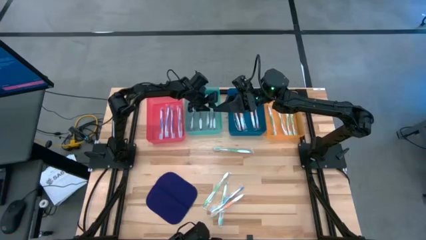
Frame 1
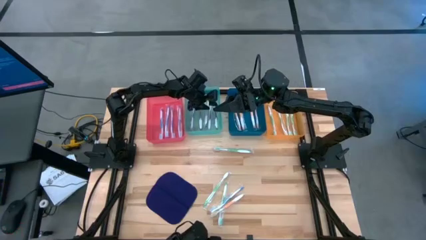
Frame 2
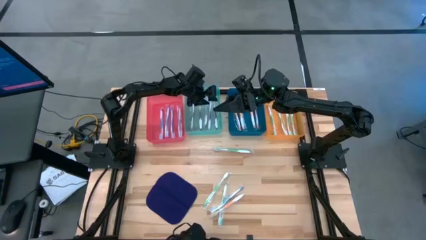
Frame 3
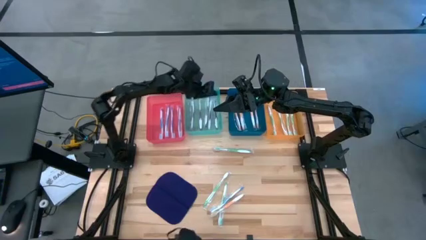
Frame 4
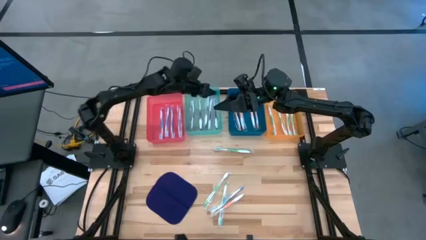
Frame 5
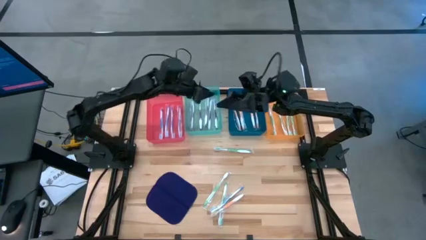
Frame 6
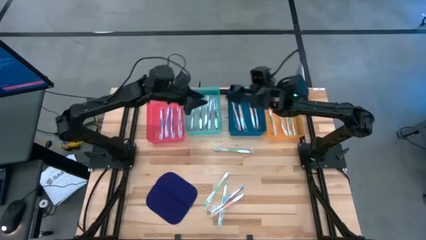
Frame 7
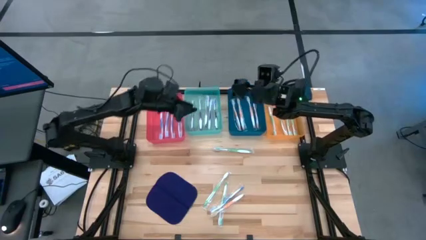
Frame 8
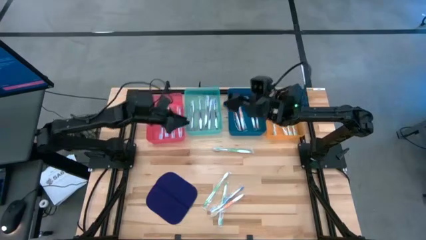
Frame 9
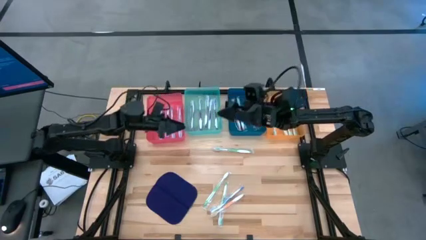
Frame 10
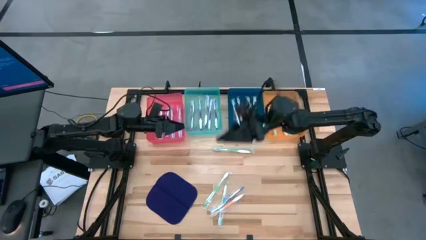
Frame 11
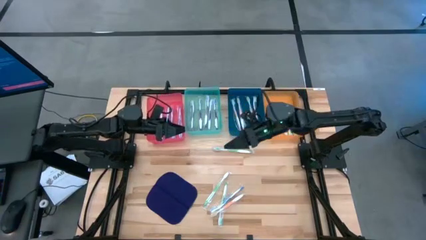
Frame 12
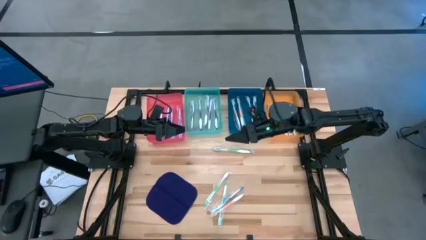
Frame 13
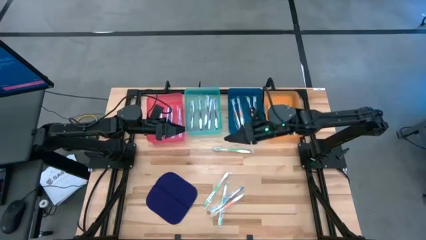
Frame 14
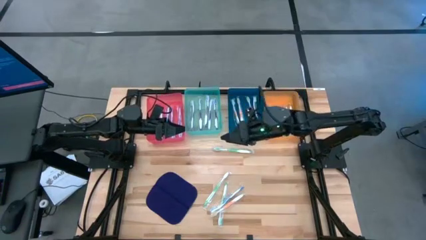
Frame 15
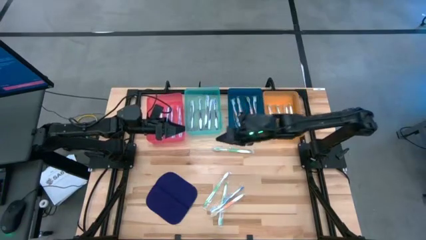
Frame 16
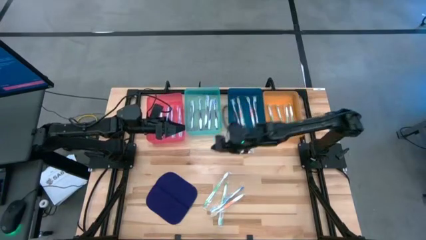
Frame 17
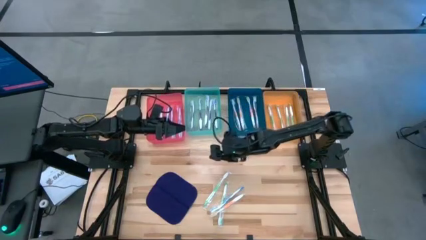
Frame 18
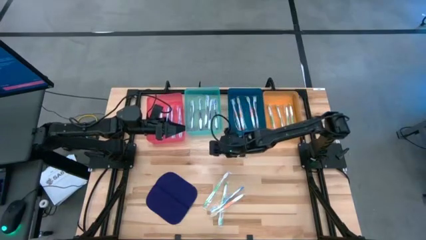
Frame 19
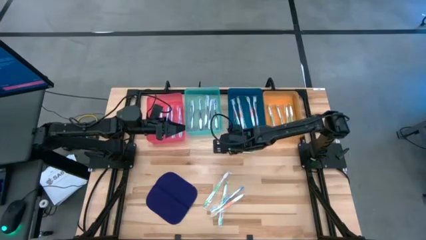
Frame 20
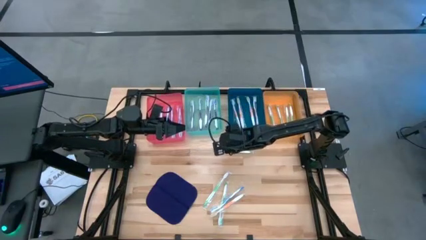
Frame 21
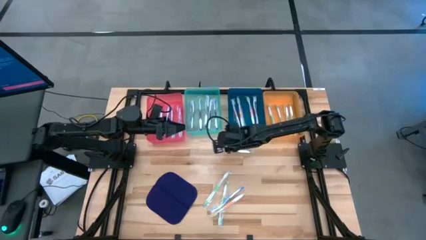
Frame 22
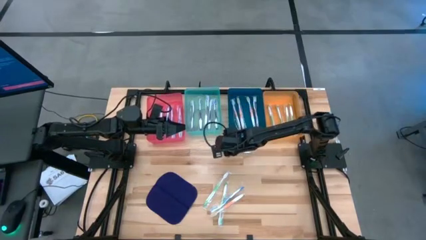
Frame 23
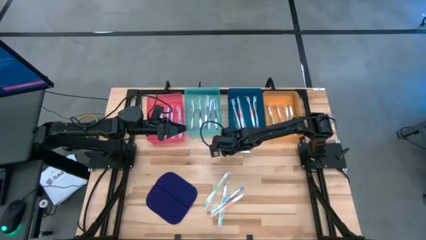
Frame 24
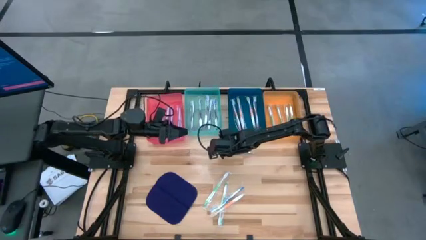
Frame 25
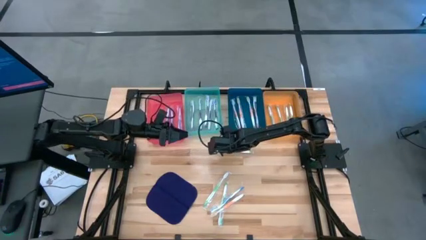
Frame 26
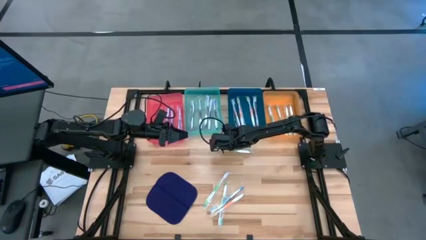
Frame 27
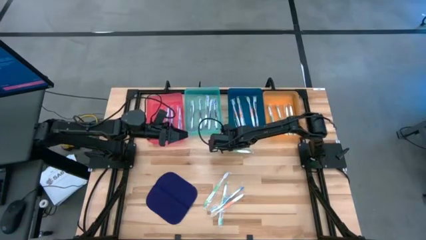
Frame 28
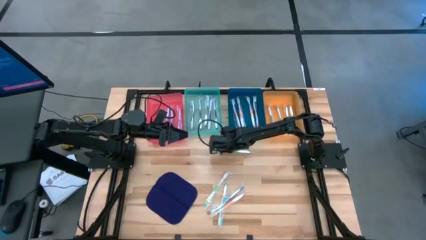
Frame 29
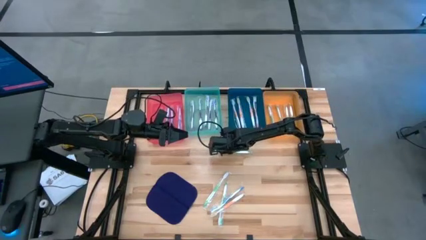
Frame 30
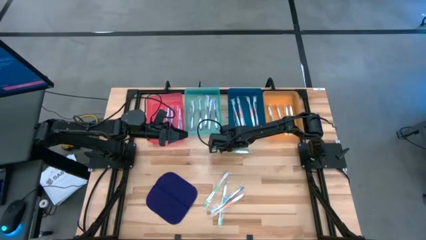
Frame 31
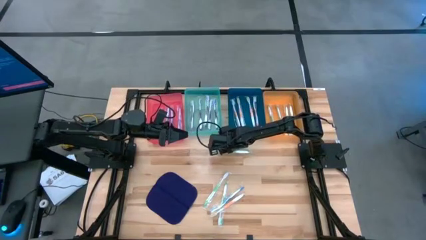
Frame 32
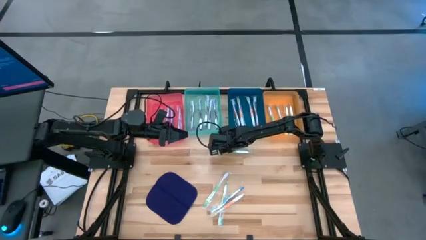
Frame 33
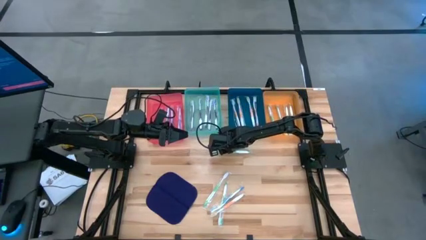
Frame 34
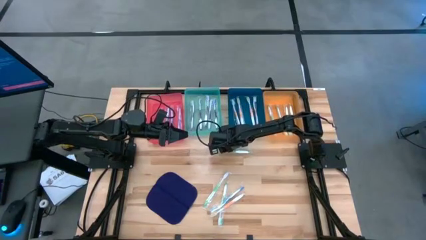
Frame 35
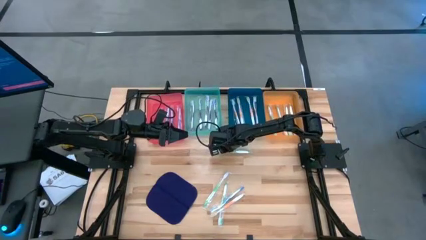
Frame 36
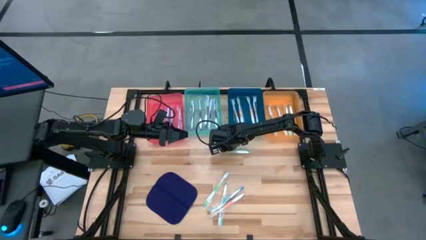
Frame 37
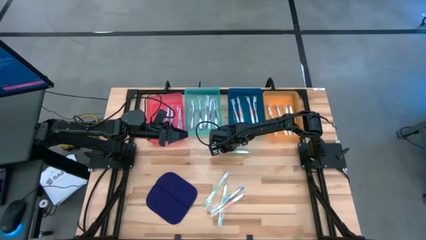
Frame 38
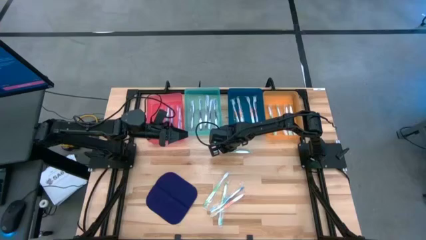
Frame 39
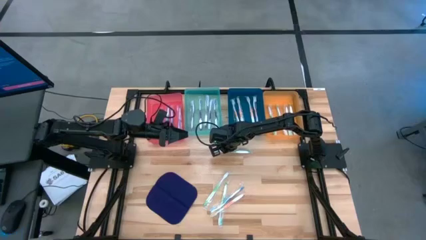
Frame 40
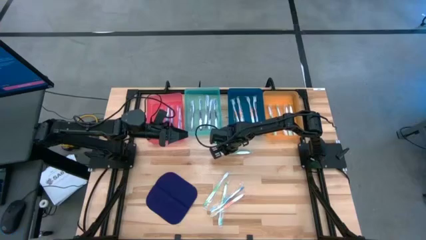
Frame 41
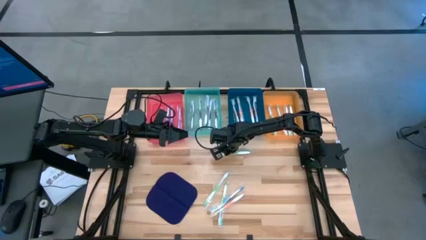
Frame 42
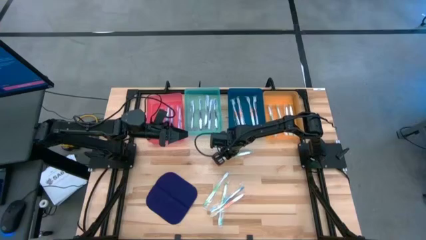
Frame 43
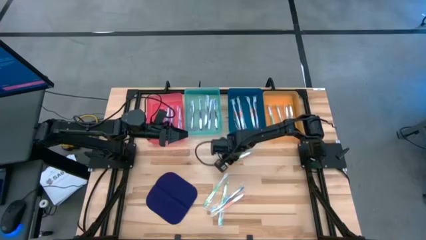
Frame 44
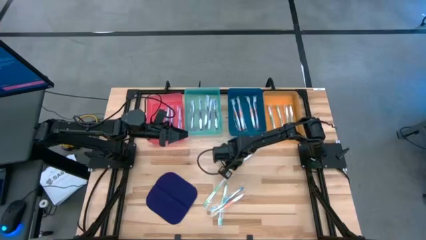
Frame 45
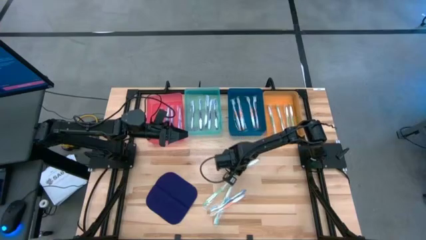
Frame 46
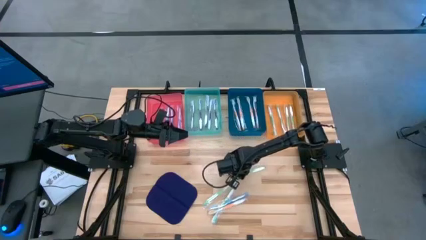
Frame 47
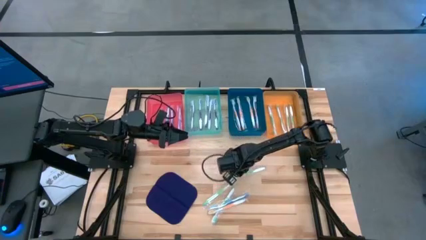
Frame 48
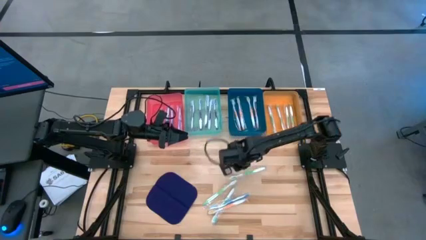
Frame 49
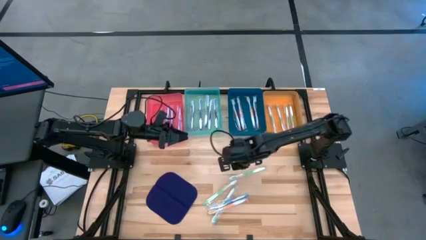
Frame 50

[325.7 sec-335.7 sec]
Task: Pick & Place Toothbrushes
Put the green toothbrush into the orange bin

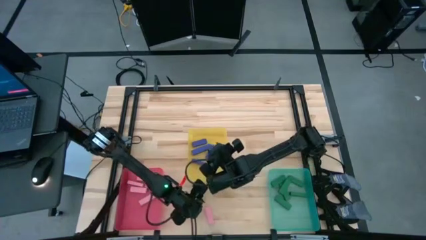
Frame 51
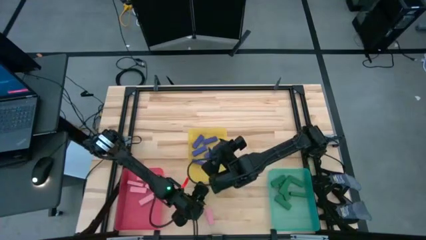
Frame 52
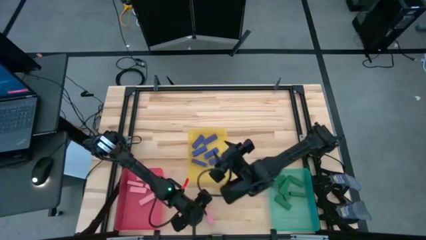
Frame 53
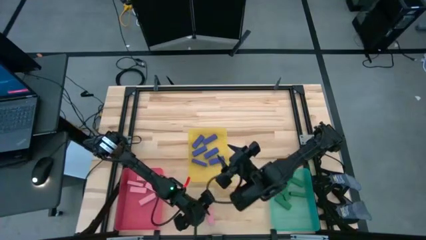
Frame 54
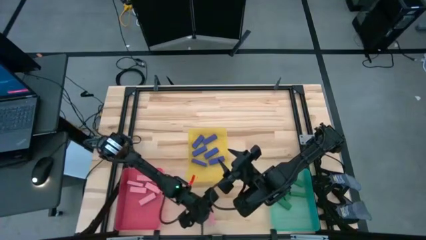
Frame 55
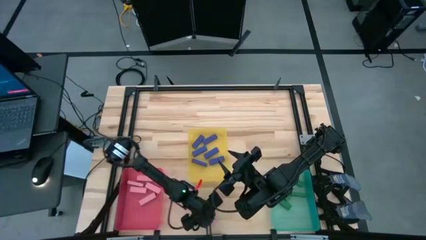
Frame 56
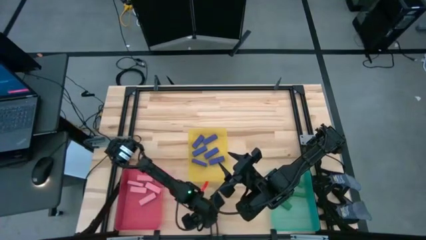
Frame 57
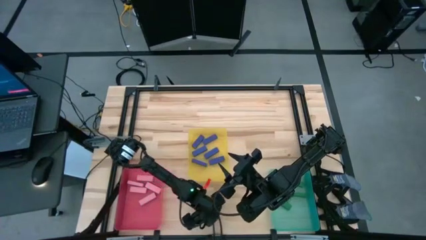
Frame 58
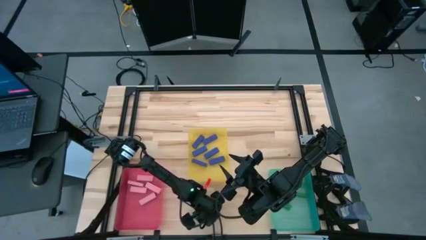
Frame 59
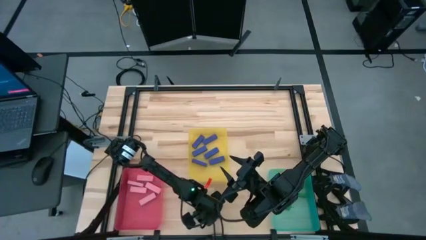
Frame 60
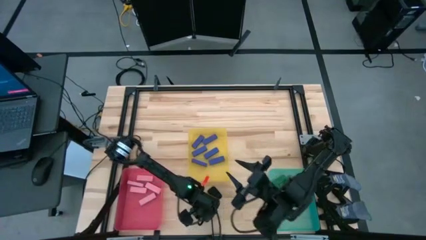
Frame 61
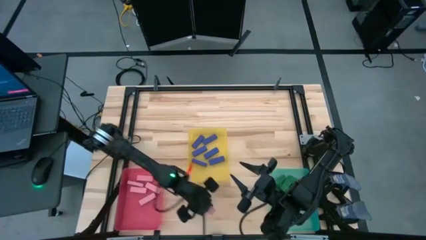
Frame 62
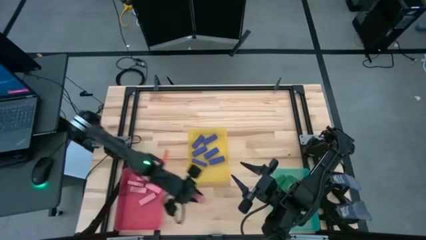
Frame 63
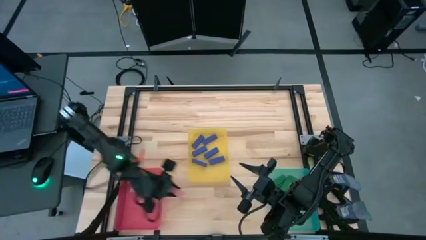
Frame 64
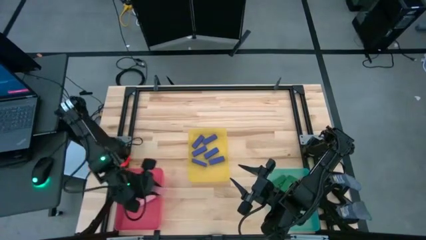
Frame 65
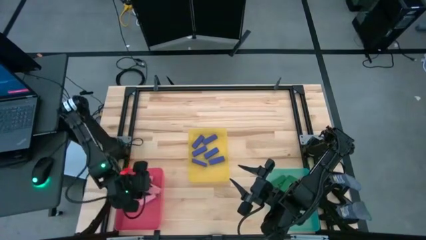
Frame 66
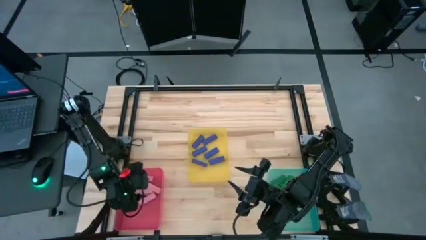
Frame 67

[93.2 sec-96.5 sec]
Task: Sort blocks
Put the pink block into the red bin
